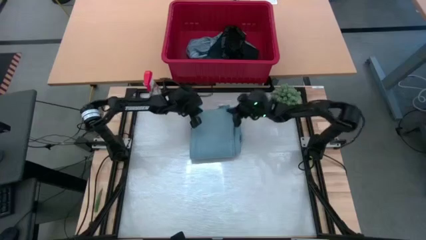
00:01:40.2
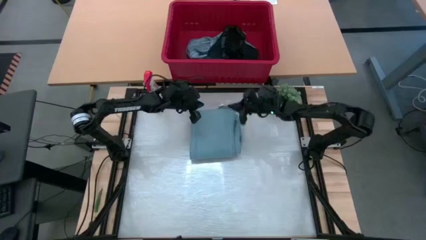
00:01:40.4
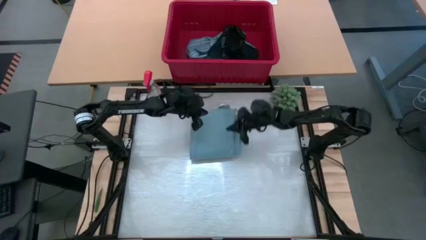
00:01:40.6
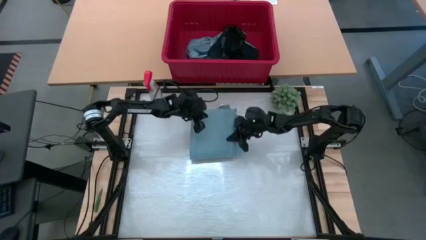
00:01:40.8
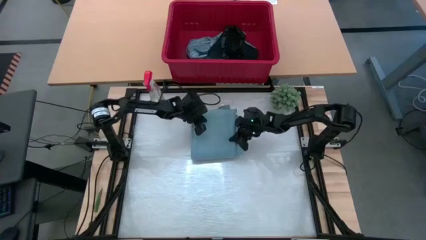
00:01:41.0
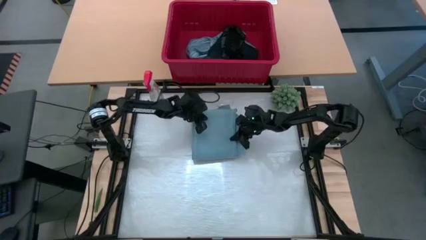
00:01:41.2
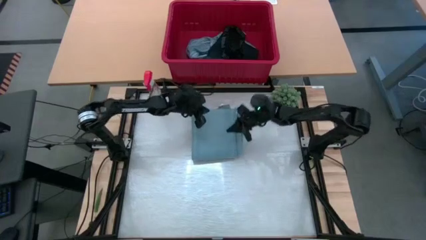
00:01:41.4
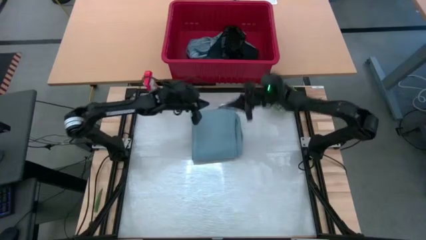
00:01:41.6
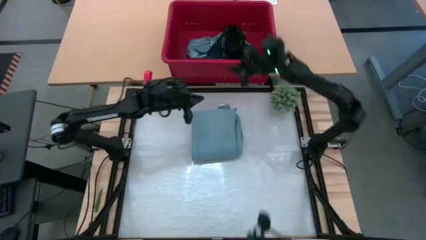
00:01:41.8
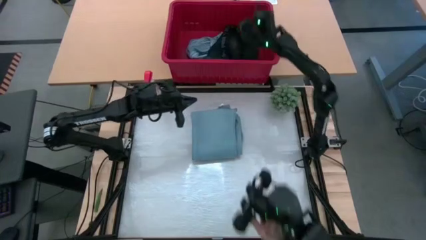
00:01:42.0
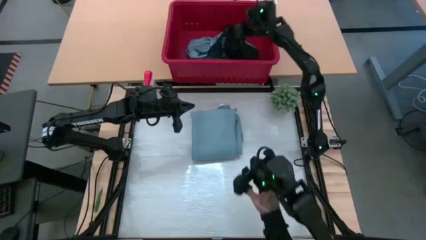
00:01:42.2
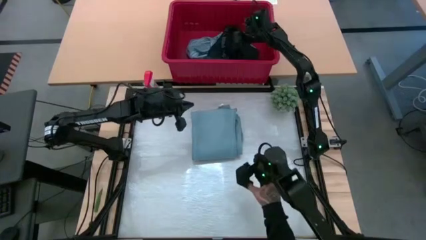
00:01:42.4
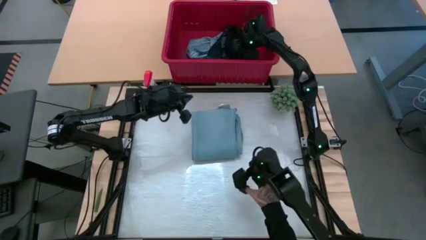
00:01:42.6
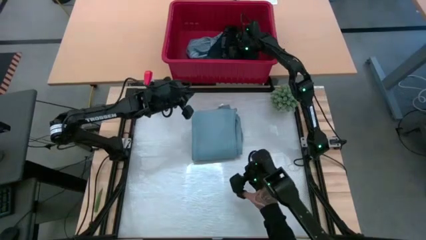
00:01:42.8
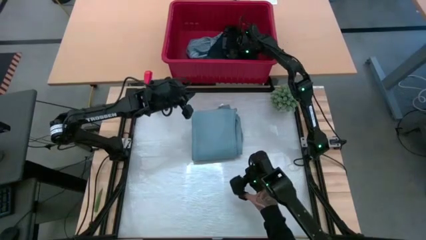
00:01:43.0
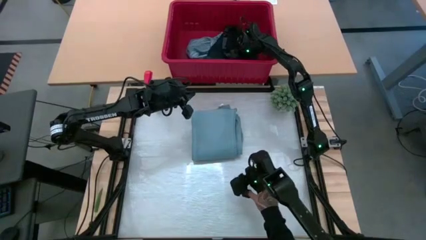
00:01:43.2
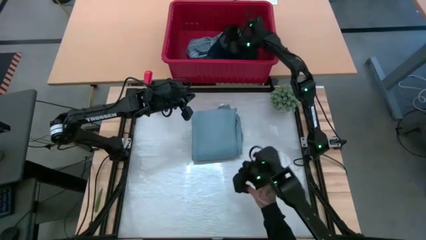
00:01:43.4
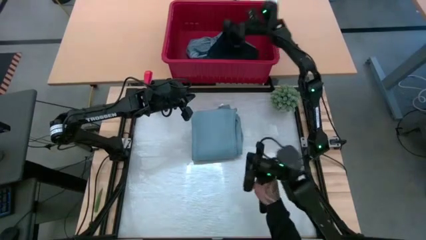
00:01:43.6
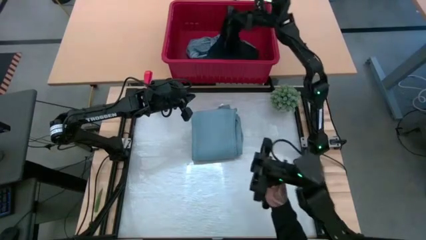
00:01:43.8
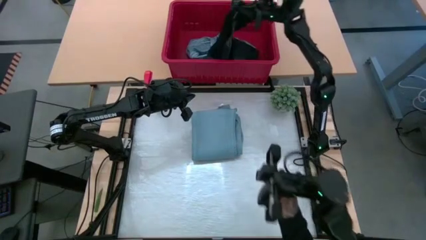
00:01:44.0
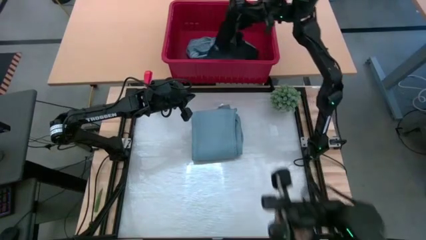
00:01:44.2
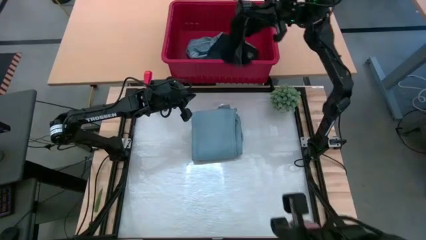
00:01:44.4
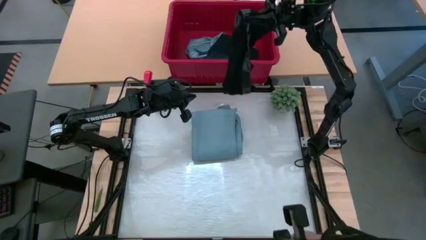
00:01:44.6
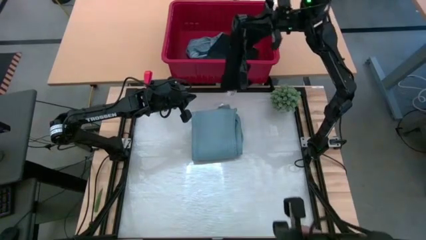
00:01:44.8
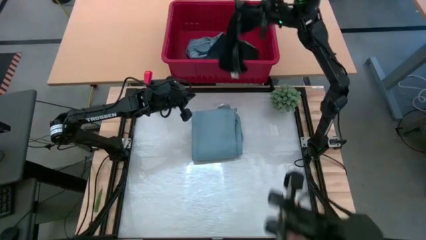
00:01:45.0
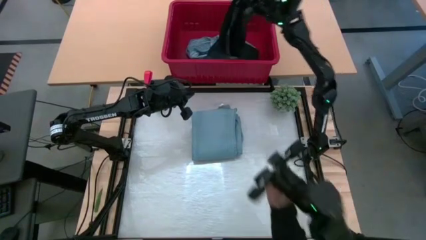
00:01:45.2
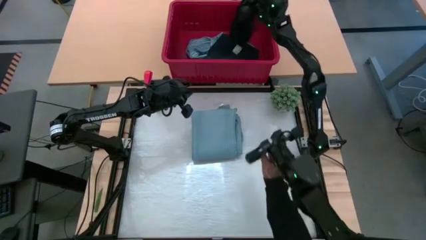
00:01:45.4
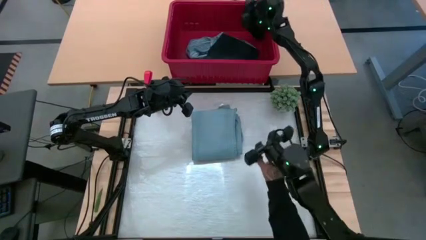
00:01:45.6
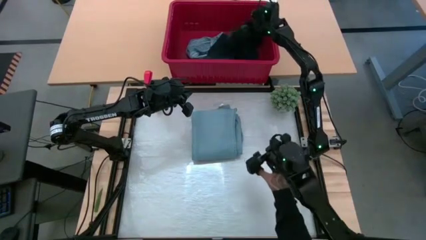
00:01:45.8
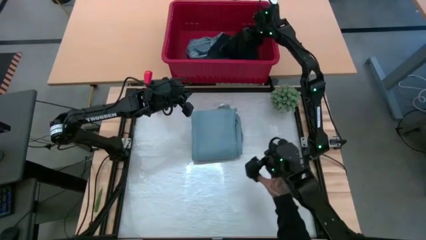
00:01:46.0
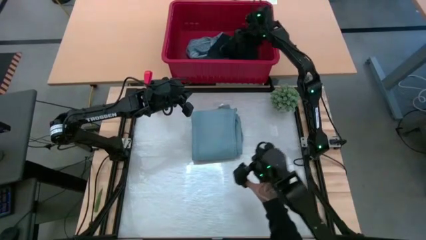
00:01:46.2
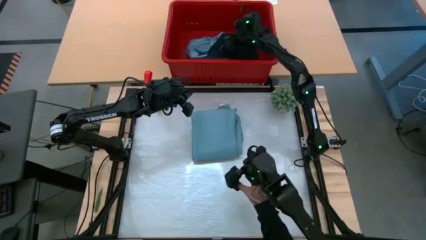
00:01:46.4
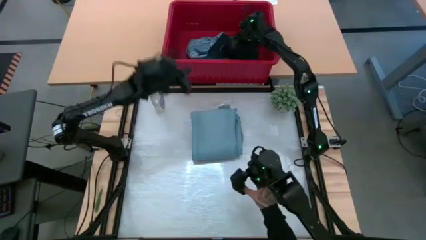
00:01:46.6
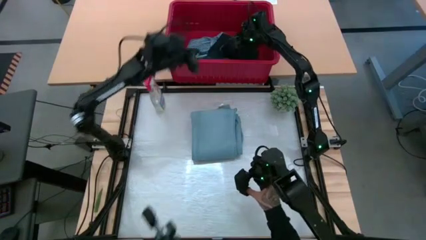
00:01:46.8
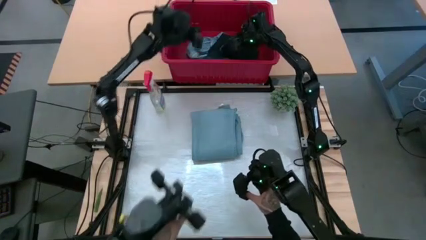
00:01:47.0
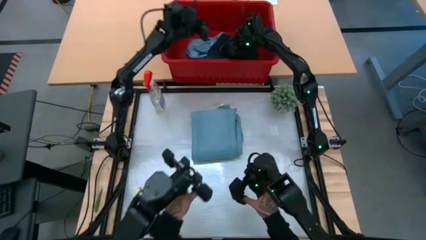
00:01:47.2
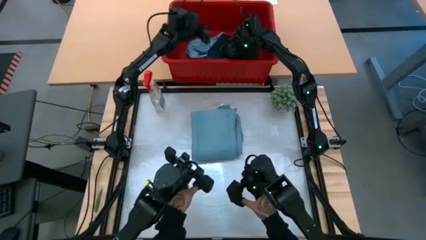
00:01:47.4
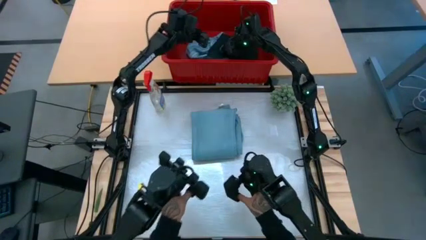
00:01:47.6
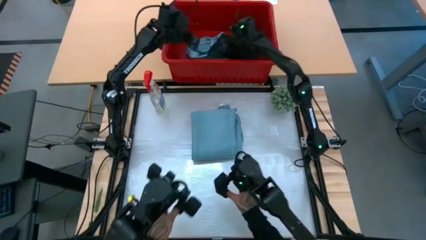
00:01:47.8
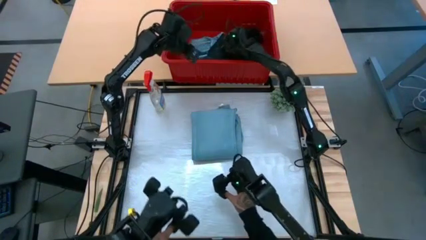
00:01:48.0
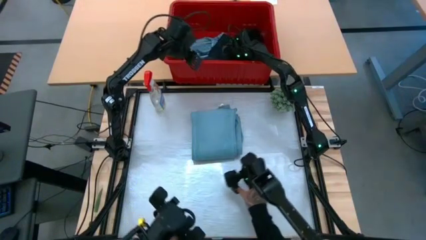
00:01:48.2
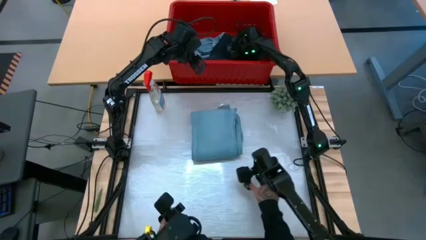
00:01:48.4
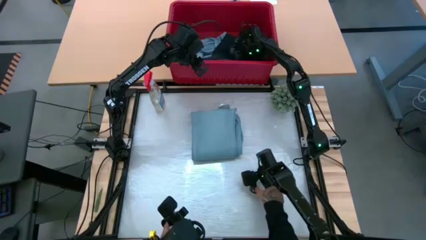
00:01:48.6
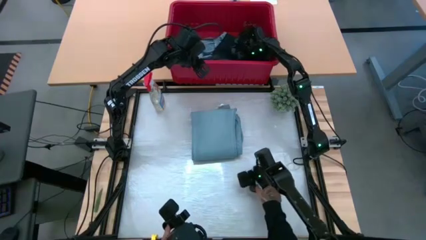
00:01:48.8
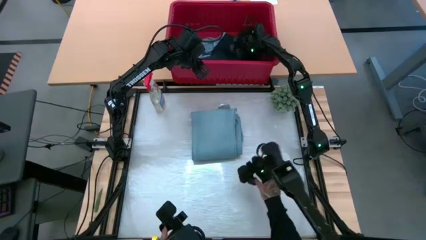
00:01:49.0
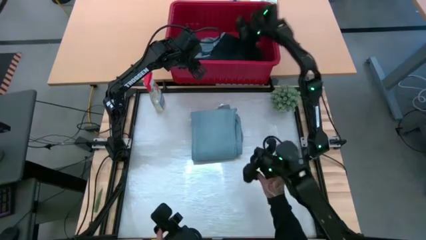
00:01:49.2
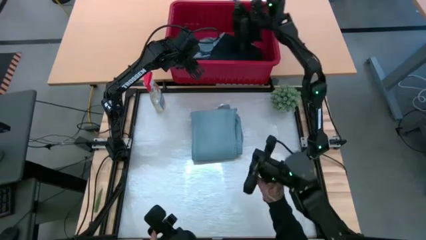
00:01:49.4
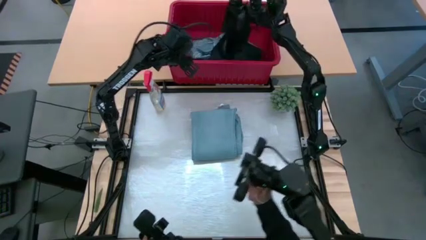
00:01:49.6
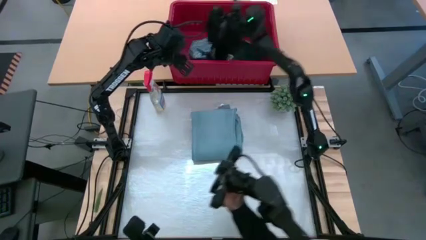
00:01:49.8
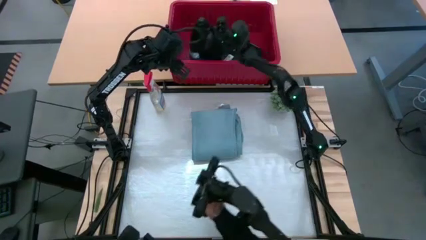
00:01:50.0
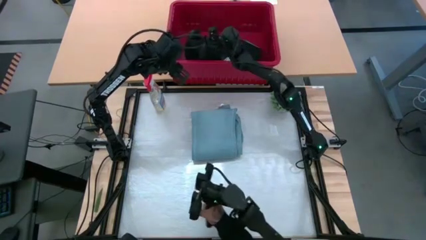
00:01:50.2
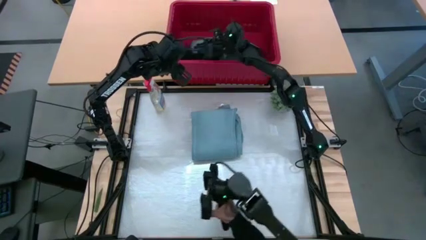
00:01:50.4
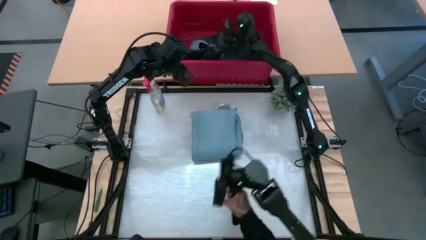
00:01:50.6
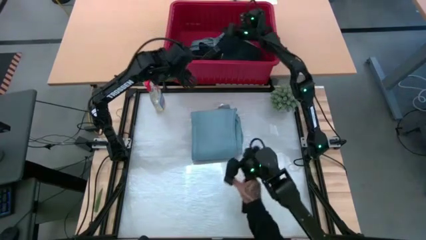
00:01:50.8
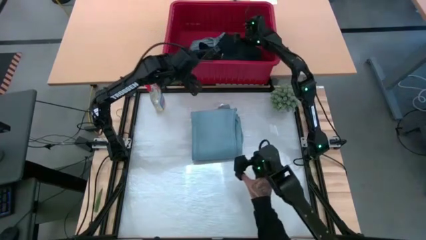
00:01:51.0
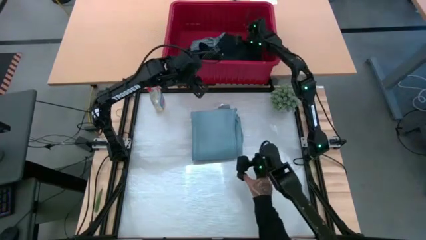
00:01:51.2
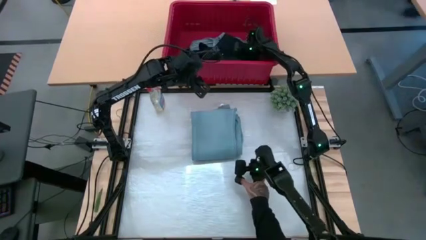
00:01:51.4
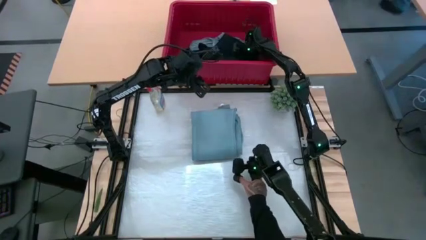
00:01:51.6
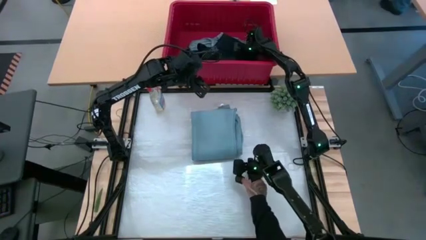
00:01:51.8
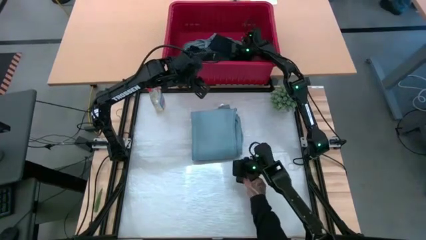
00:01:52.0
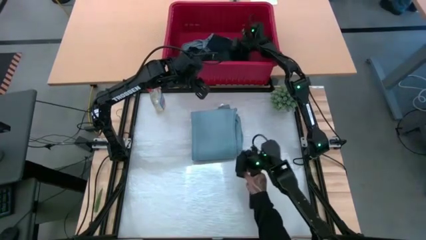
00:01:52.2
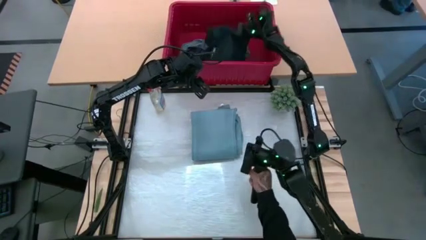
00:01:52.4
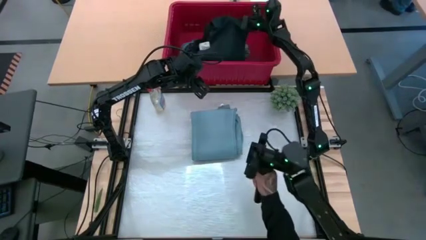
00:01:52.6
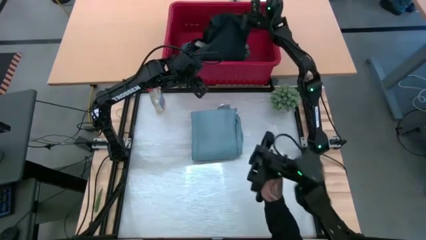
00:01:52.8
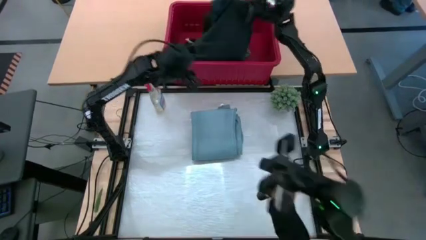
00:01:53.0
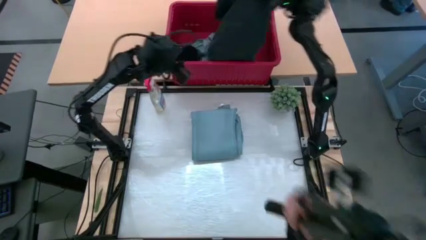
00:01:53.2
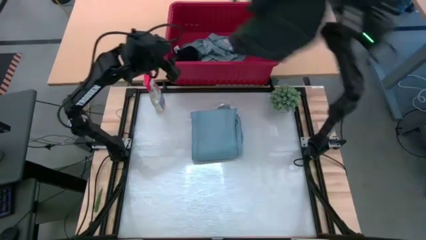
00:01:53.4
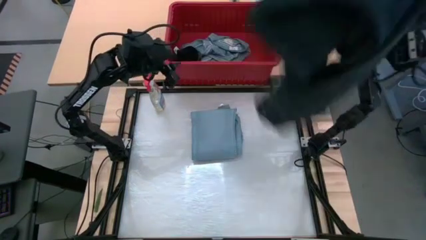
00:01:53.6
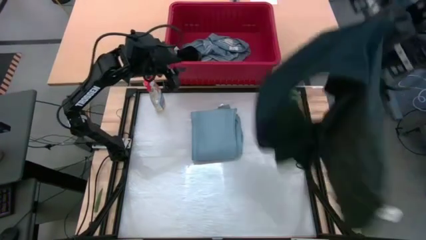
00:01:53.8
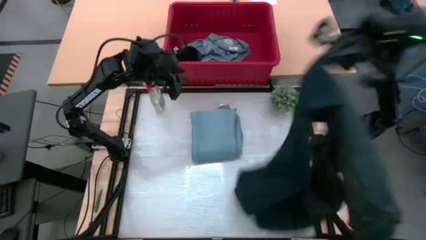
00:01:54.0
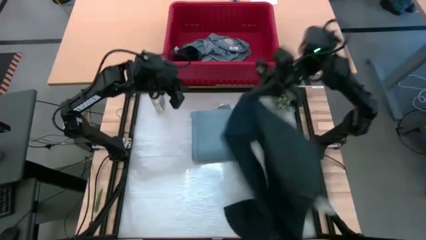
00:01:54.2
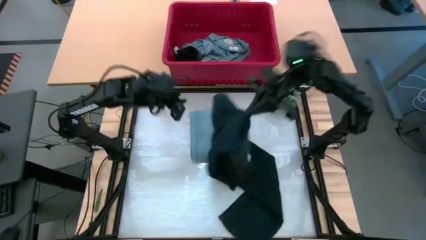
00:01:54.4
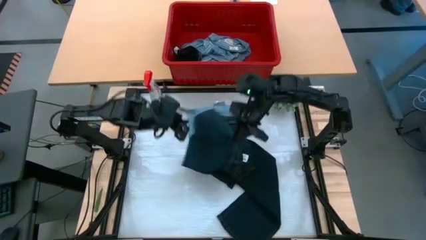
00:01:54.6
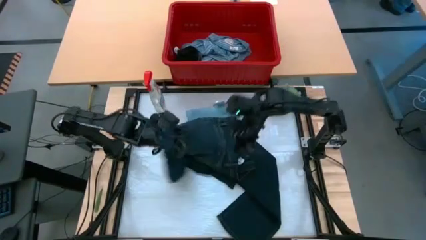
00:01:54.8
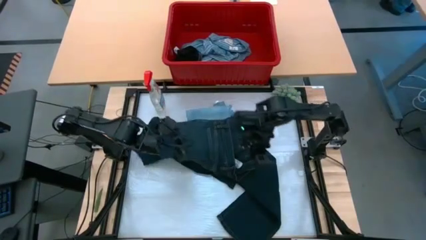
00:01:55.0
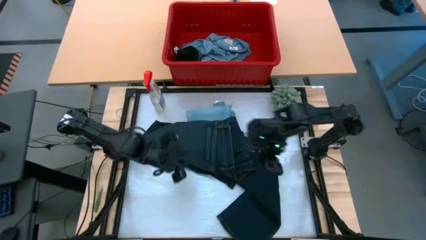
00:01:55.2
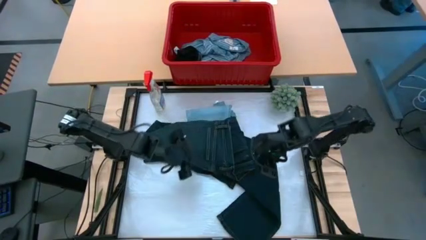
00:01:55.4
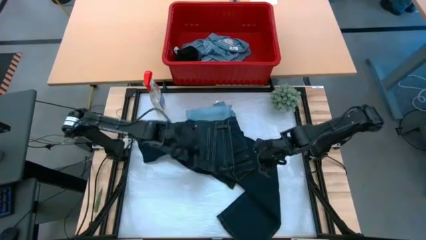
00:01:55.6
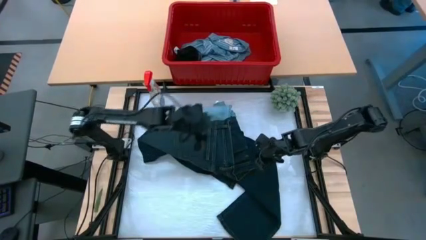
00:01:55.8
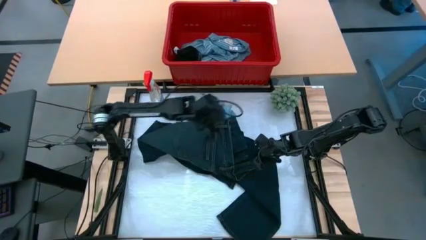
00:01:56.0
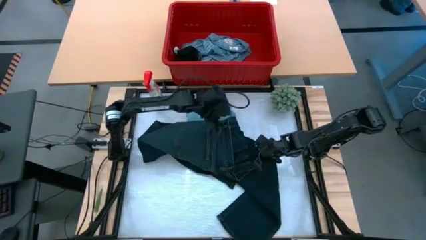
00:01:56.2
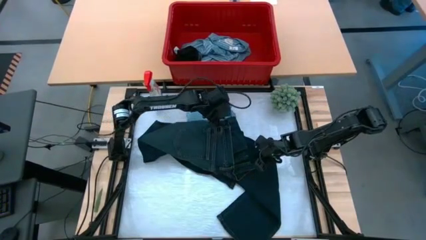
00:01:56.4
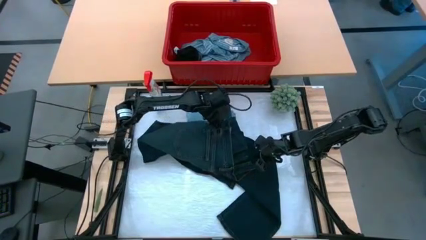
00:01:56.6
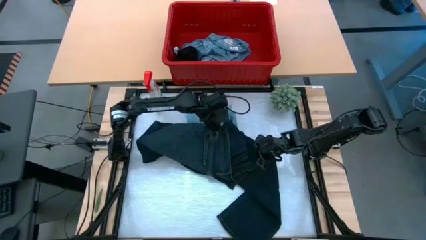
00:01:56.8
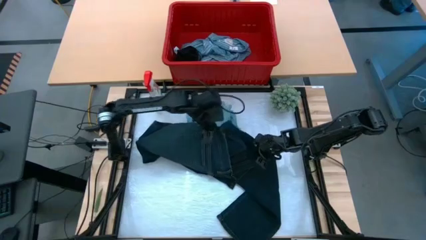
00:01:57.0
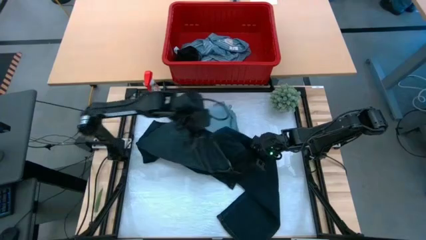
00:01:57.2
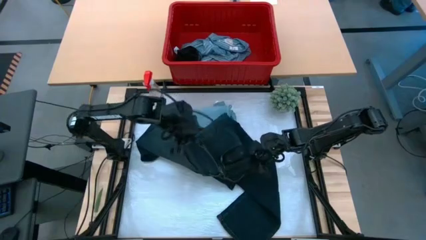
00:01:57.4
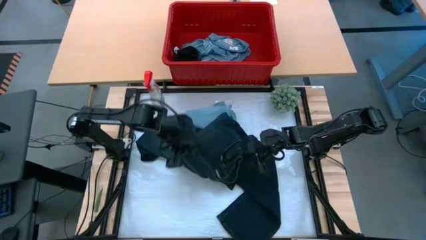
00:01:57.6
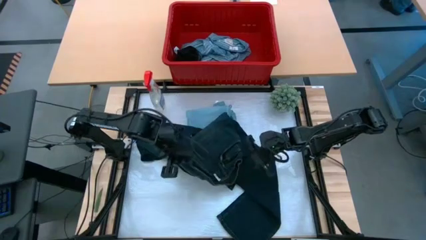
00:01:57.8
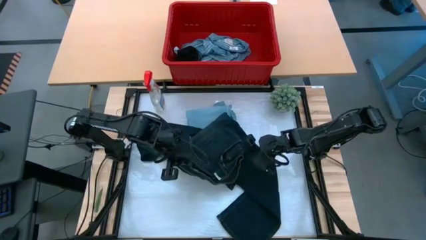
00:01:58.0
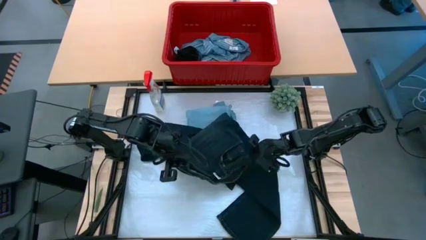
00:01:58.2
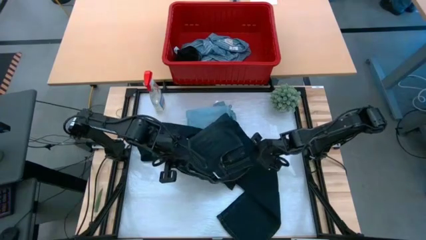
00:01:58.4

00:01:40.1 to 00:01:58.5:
Task: Fold Laundry from Bin
Fold the black pants from the red laundry bin
